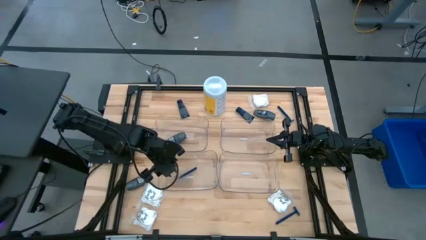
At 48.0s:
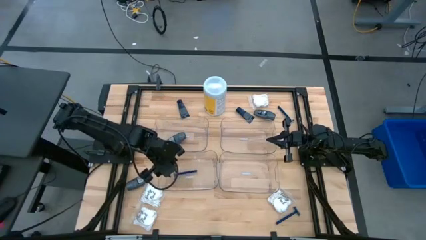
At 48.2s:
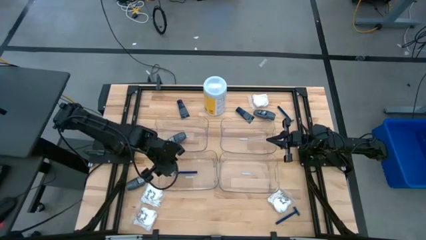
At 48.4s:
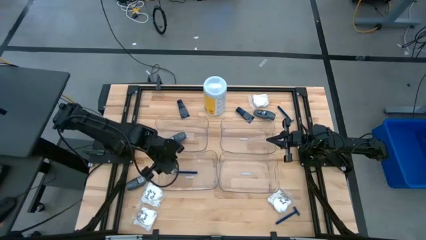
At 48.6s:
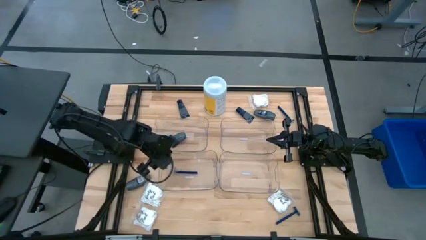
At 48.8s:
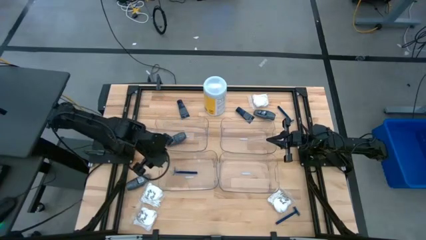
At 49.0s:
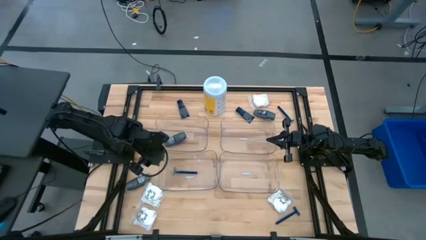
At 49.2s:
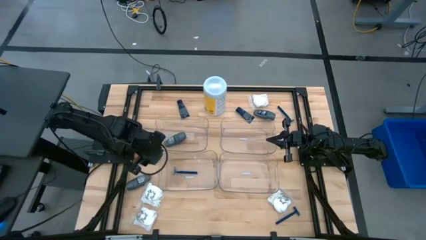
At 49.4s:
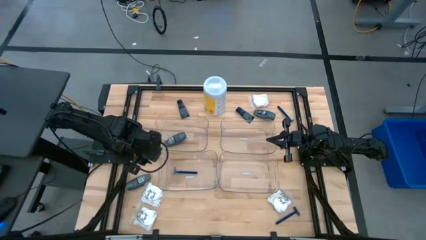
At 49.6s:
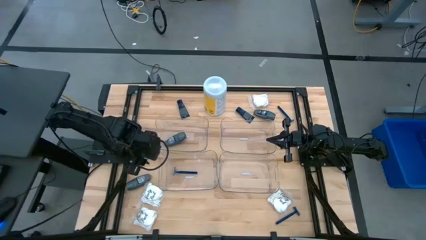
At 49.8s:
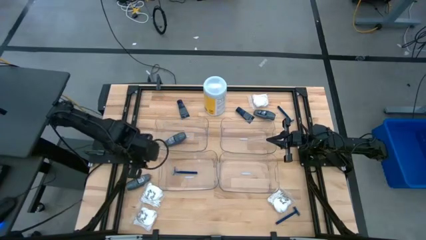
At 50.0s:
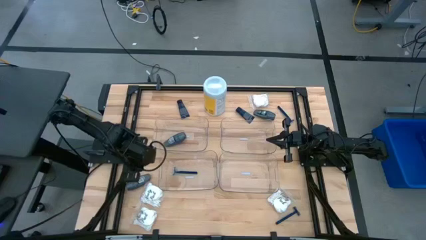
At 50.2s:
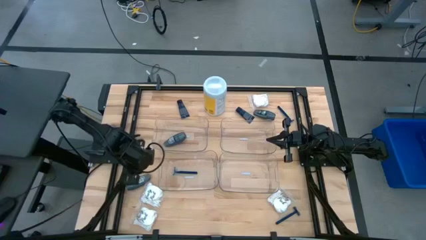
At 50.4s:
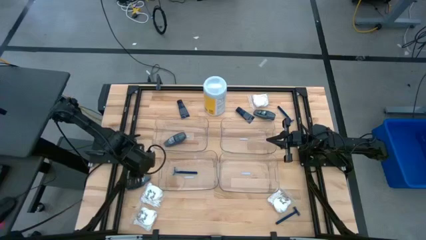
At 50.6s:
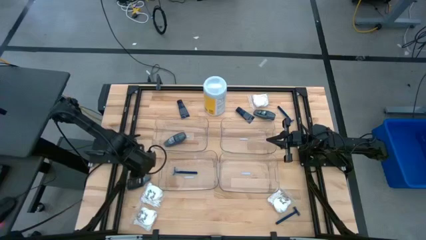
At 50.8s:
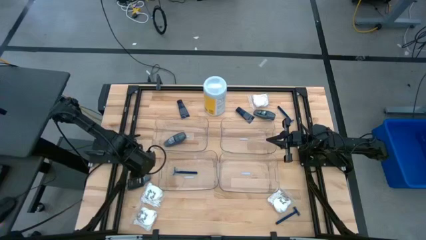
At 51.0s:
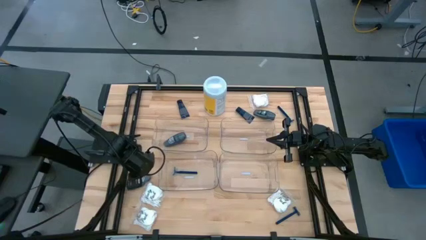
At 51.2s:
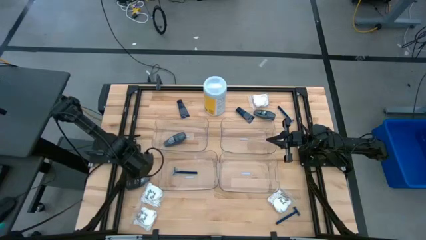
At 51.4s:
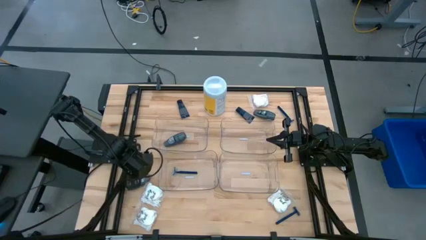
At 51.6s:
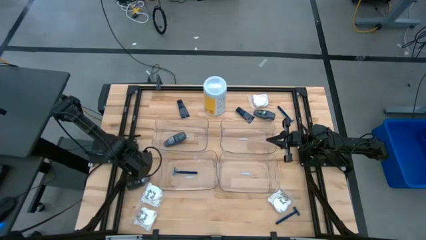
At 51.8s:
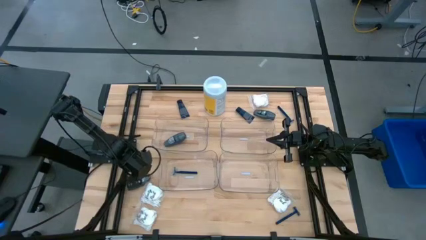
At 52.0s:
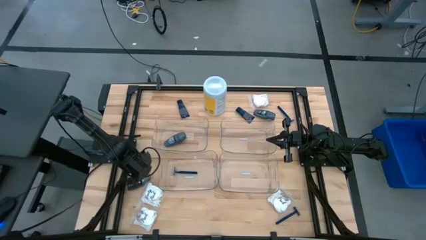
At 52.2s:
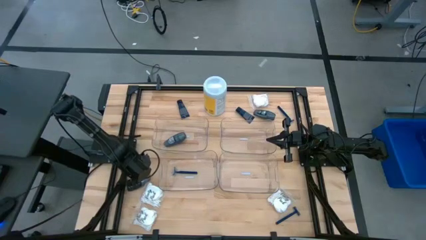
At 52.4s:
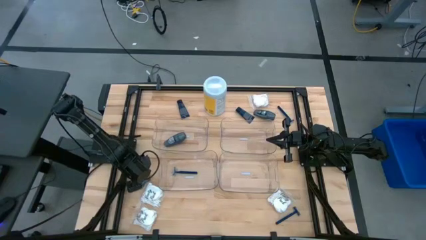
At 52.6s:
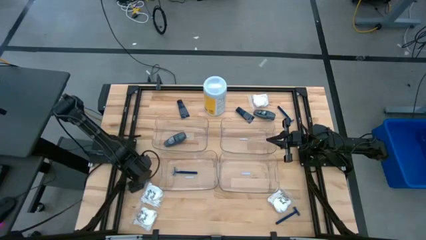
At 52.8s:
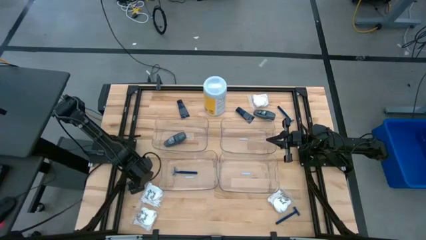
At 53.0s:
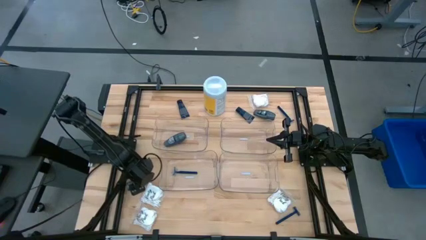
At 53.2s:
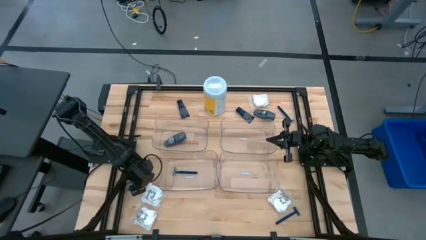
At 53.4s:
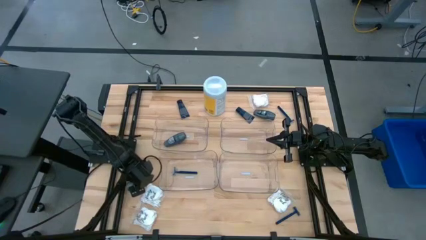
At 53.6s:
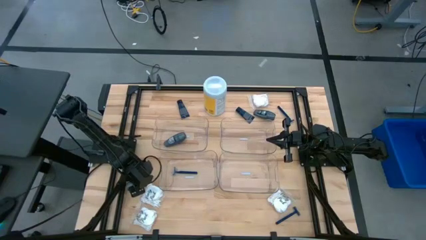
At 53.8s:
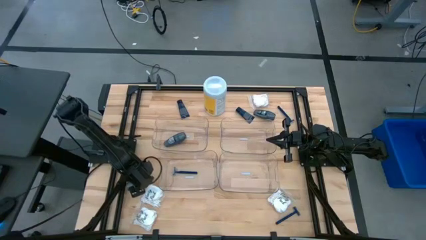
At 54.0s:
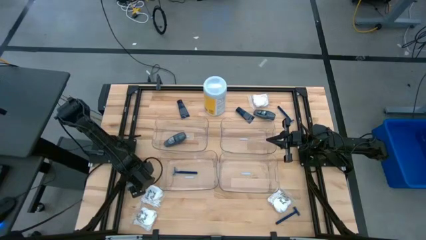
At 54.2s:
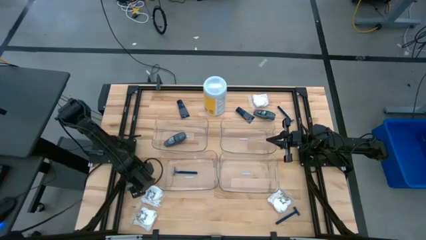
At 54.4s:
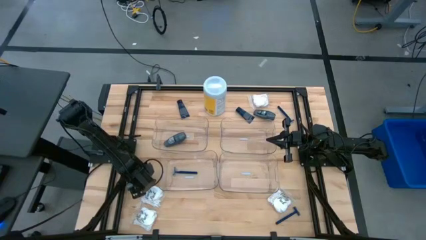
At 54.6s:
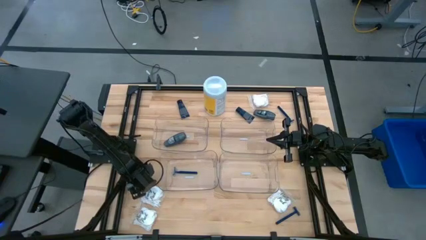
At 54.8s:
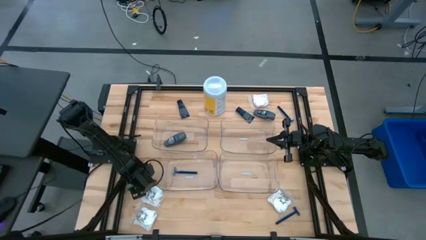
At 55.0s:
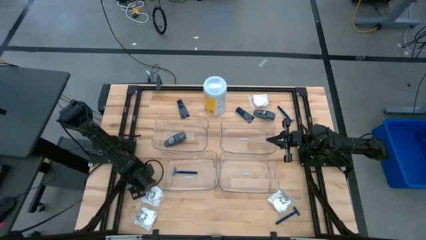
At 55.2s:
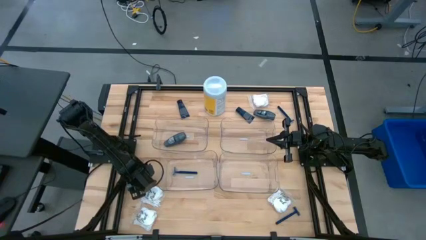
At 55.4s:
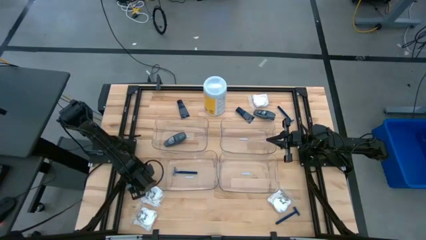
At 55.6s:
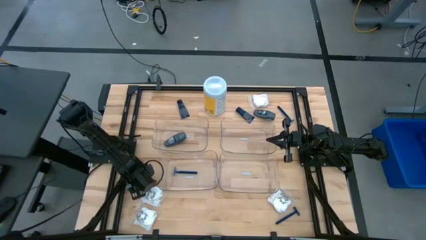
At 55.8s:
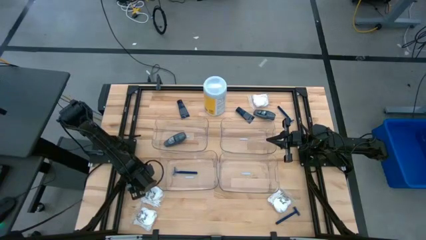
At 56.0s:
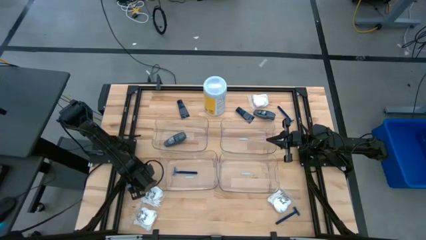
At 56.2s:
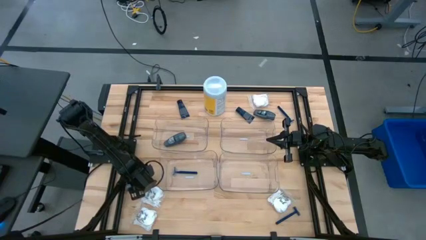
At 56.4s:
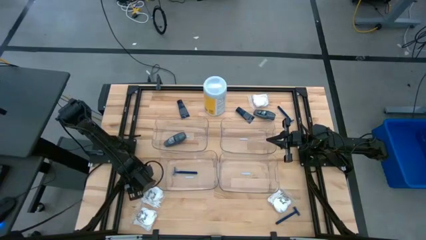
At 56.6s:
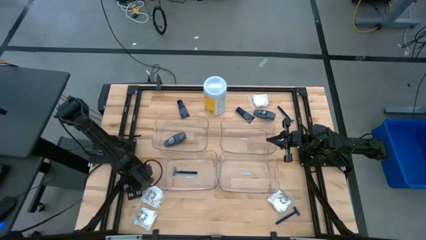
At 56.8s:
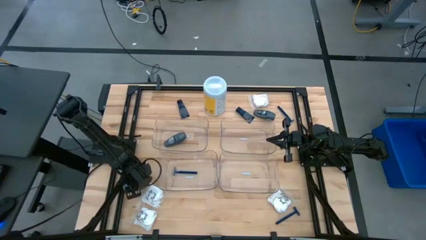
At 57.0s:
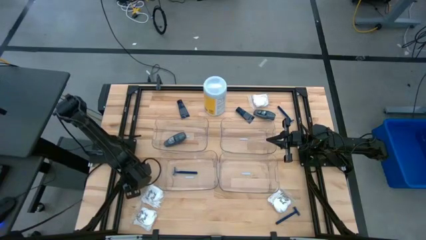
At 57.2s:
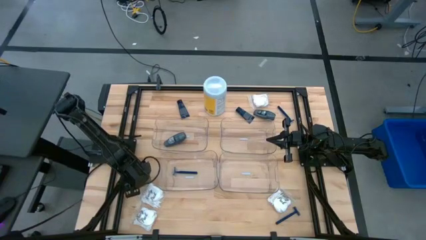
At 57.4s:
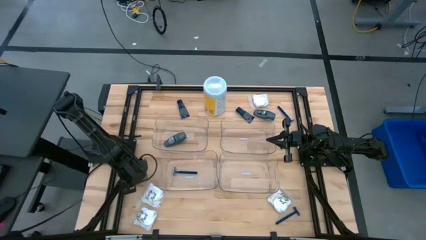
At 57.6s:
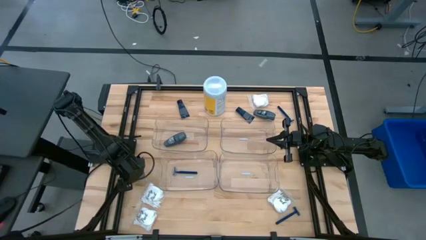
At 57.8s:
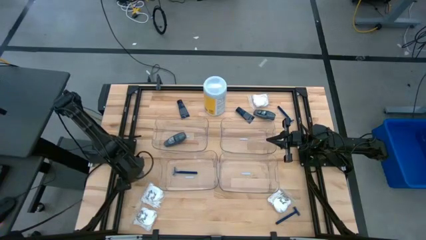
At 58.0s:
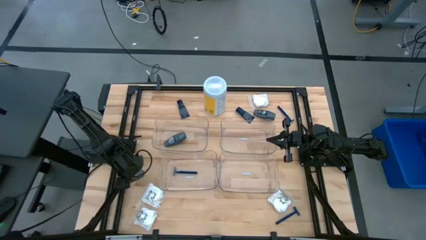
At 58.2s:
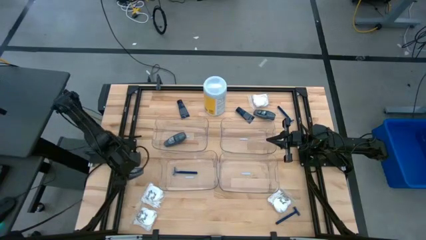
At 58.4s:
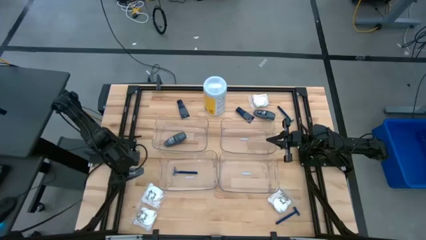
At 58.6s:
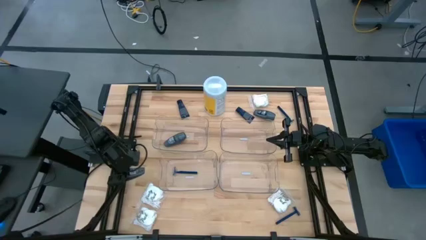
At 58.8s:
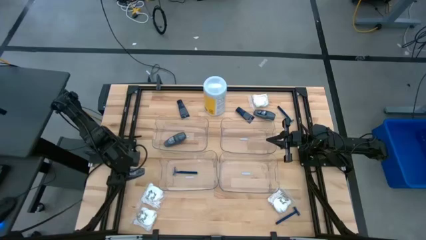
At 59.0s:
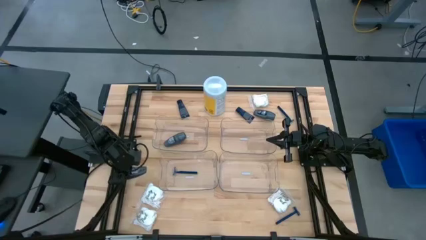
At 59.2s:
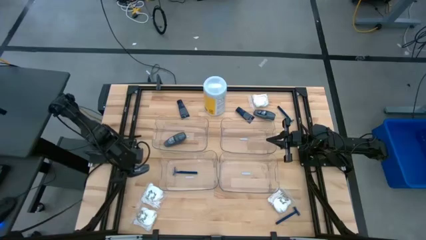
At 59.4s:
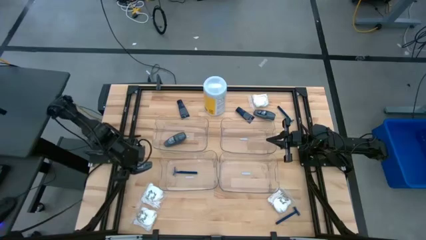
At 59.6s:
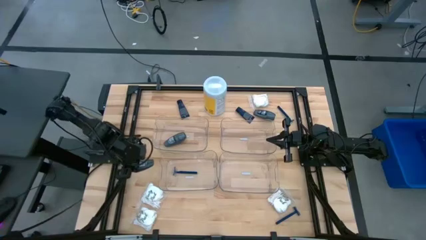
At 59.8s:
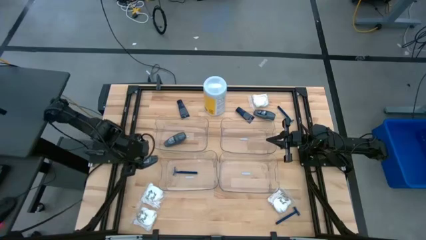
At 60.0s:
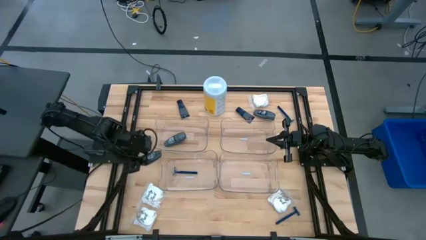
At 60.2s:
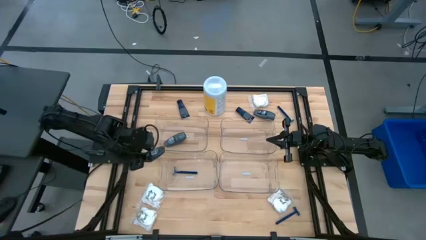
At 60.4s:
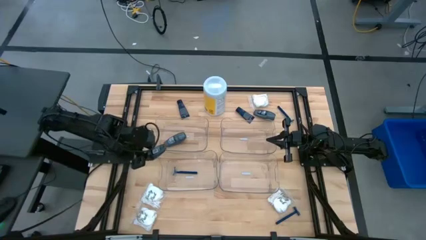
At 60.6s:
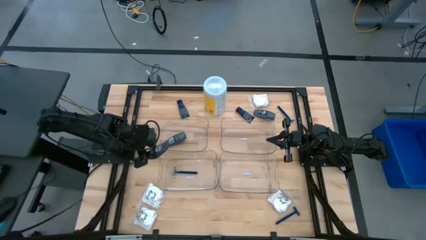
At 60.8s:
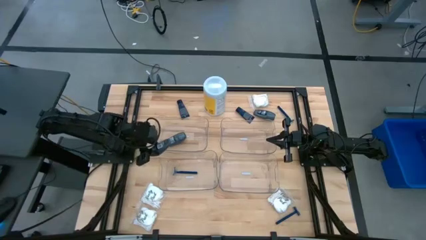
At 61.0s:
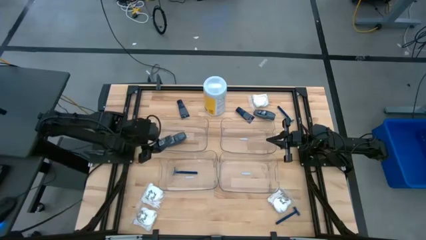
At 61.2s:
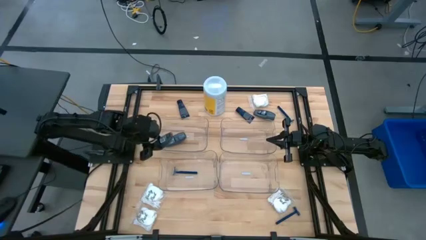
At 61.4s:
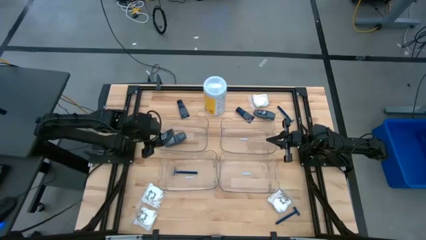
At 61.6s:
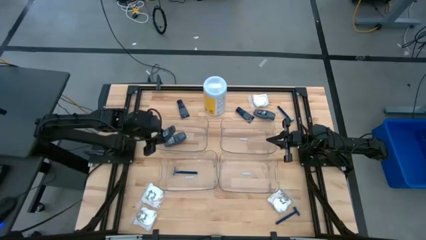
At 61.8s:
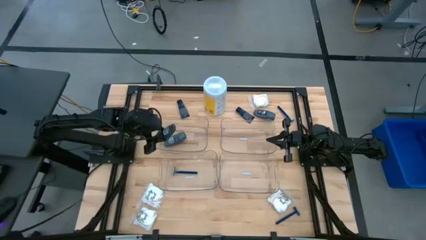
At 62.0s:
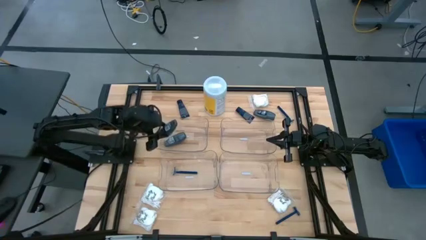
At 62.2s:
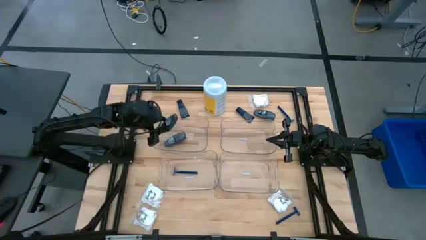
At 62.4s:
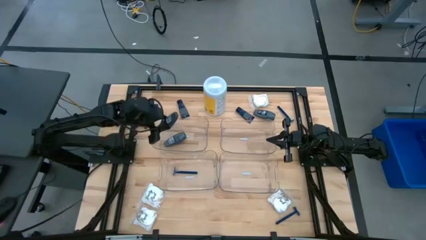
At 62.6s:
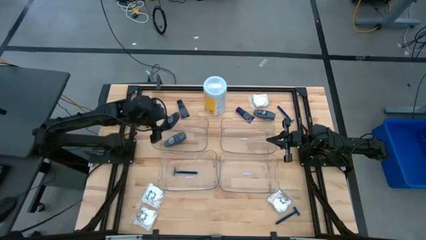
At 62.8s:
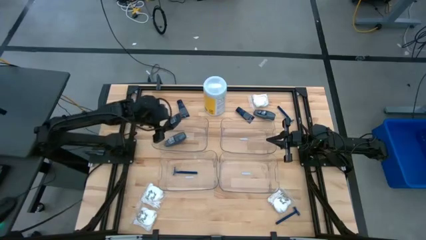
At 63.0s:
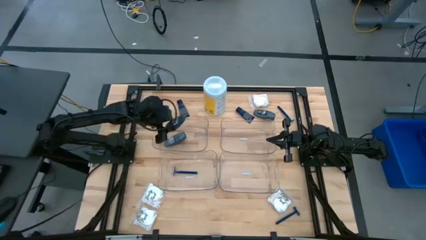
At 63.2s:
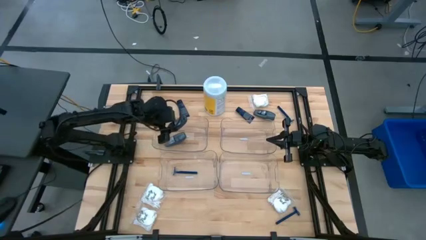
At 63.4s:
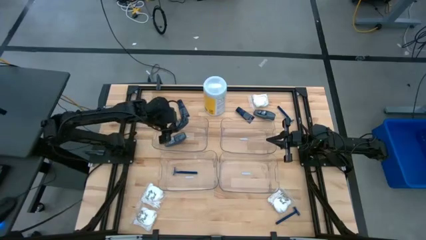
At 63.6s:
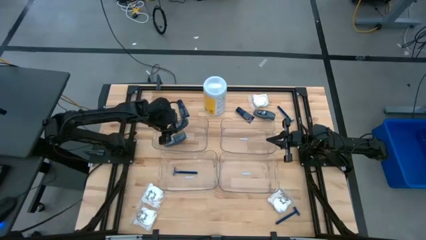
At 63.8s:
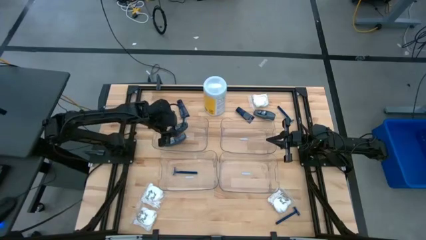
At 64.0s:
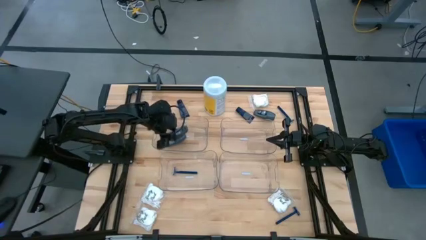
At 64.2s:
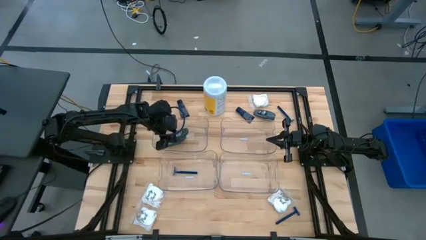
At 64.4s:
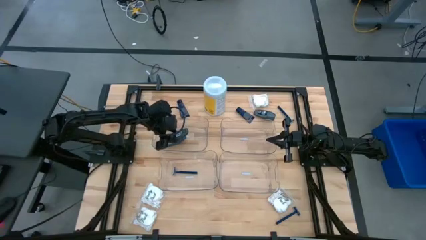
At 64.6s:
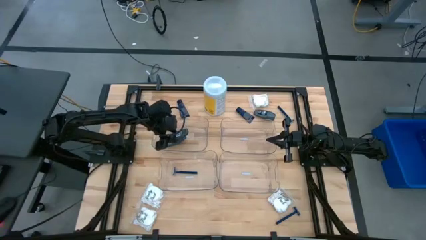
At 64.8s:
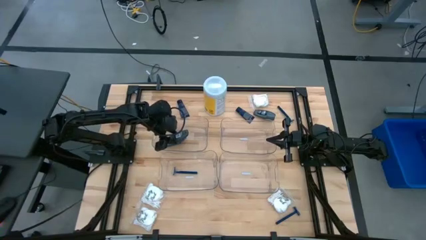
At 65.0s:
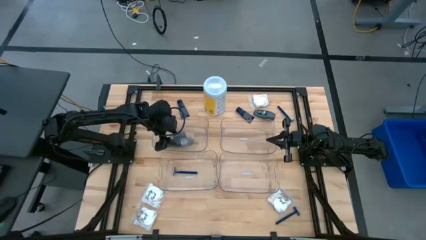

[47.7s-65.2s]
Task: Pick & Place Travel size toiletries
Put the bottom black deodorant into the top left transparent bin
